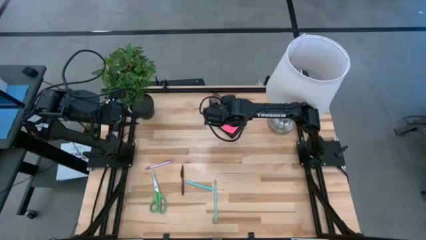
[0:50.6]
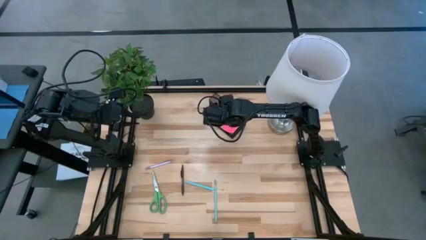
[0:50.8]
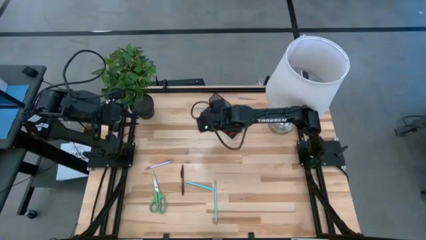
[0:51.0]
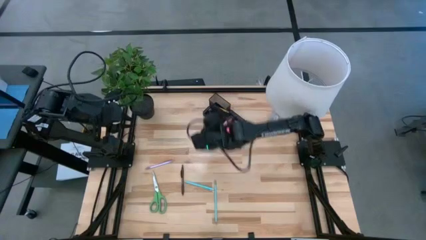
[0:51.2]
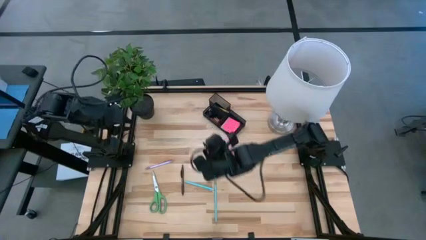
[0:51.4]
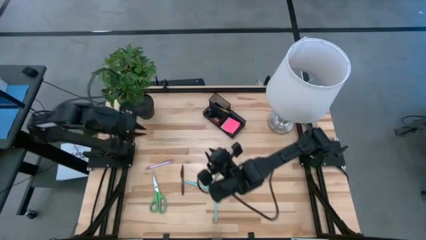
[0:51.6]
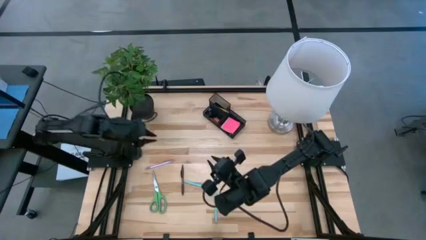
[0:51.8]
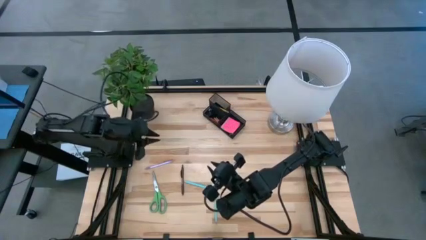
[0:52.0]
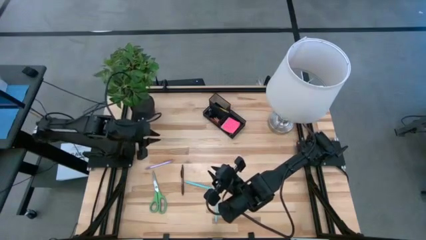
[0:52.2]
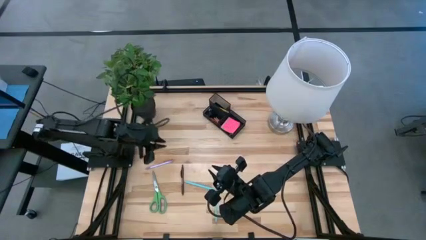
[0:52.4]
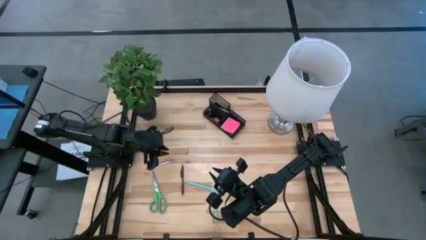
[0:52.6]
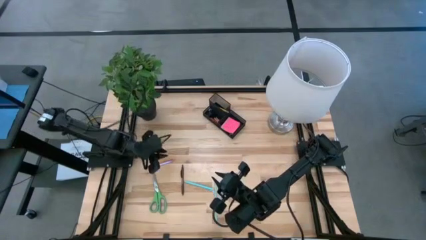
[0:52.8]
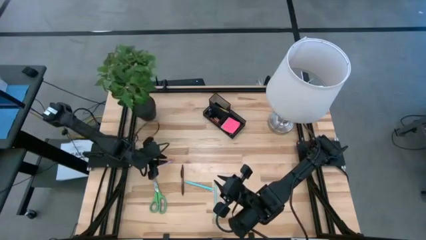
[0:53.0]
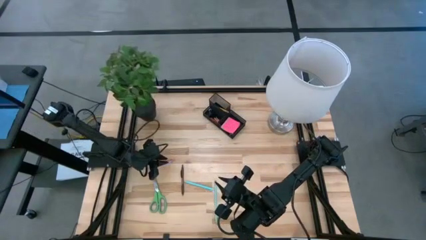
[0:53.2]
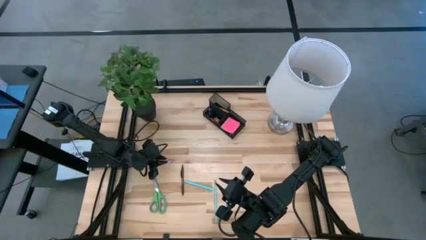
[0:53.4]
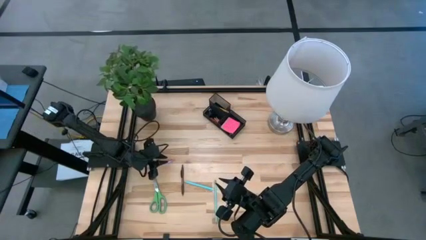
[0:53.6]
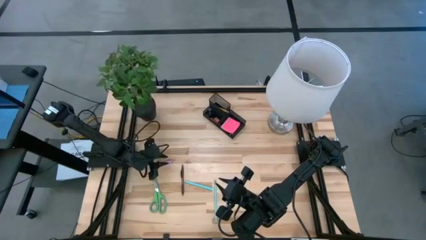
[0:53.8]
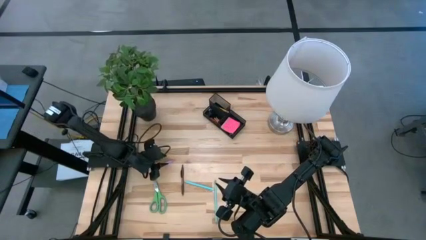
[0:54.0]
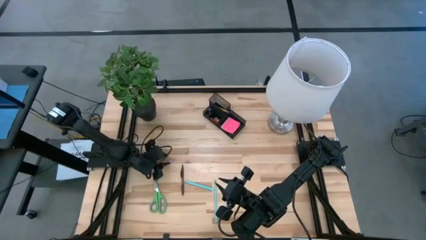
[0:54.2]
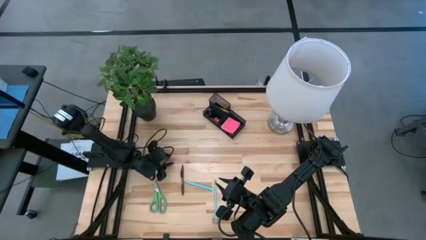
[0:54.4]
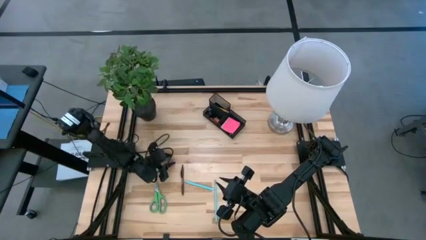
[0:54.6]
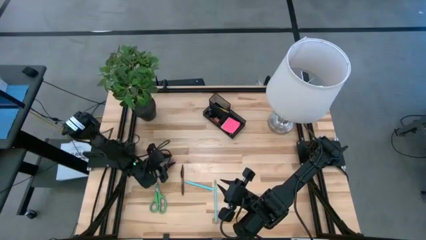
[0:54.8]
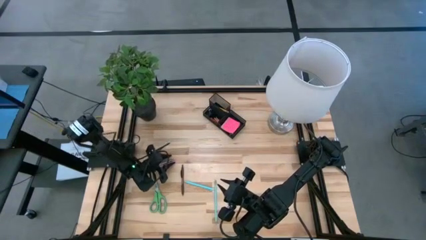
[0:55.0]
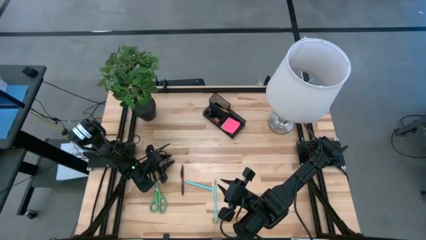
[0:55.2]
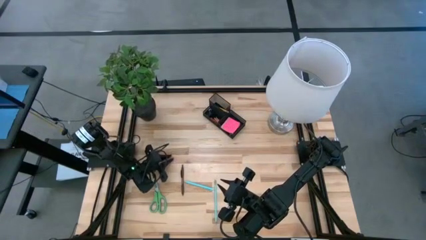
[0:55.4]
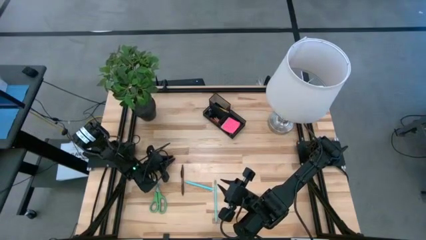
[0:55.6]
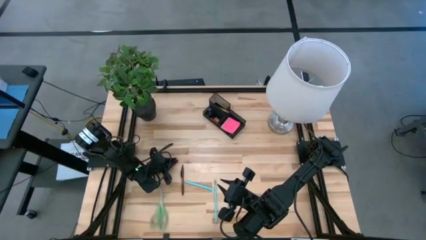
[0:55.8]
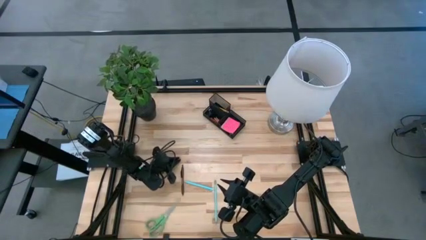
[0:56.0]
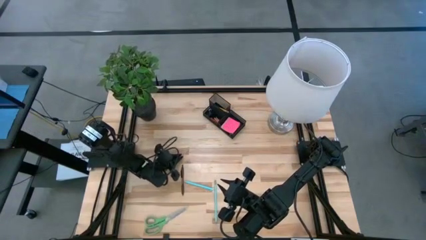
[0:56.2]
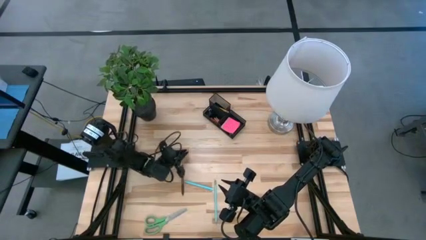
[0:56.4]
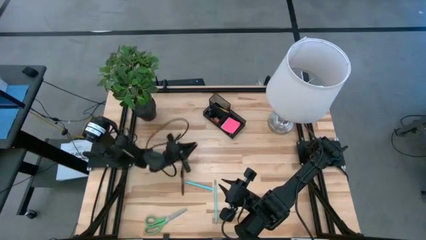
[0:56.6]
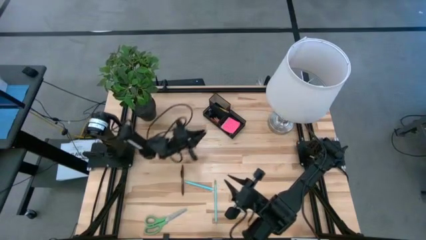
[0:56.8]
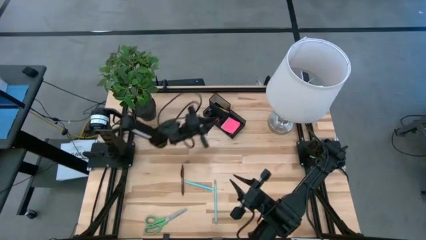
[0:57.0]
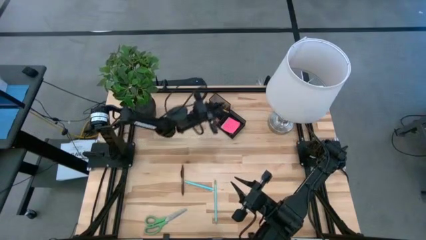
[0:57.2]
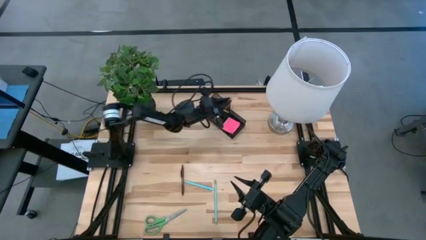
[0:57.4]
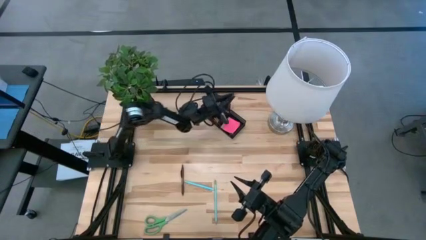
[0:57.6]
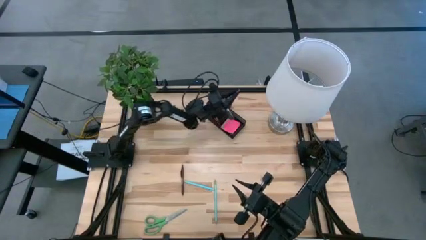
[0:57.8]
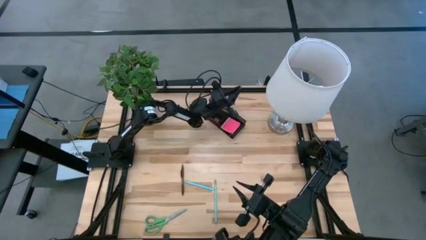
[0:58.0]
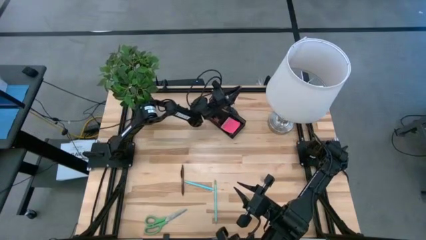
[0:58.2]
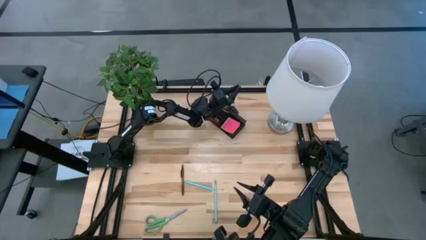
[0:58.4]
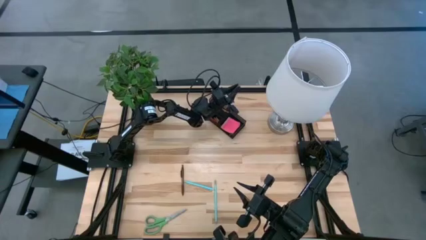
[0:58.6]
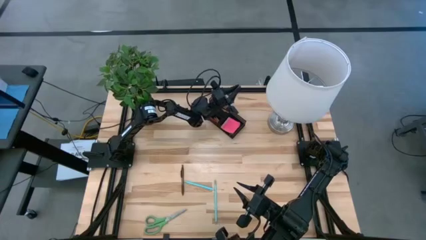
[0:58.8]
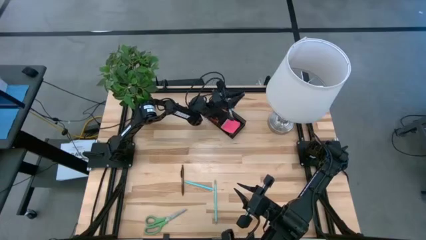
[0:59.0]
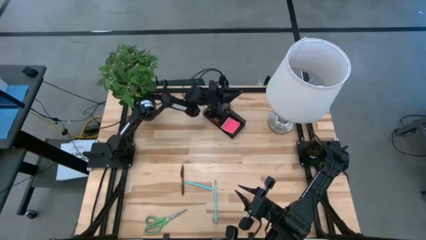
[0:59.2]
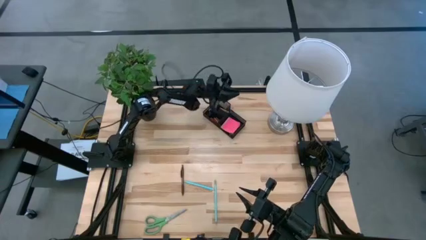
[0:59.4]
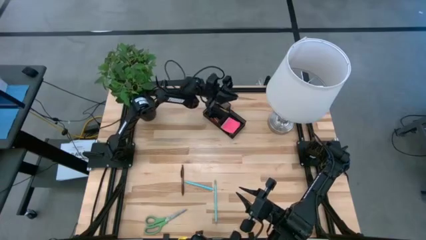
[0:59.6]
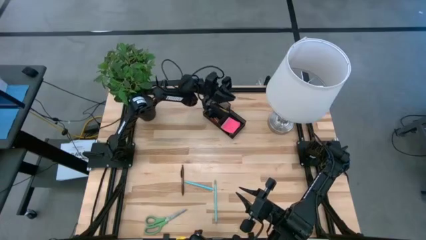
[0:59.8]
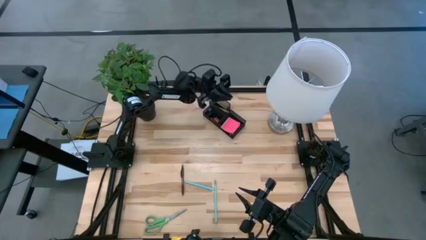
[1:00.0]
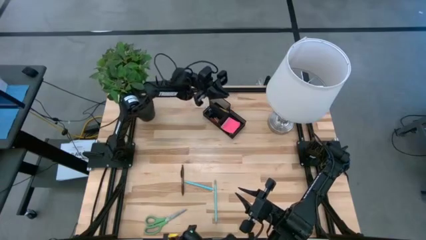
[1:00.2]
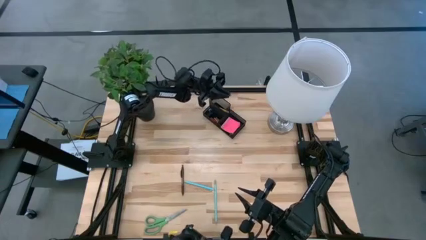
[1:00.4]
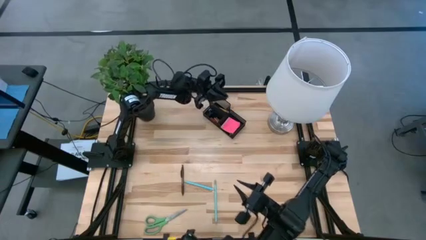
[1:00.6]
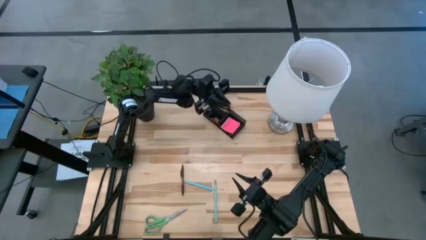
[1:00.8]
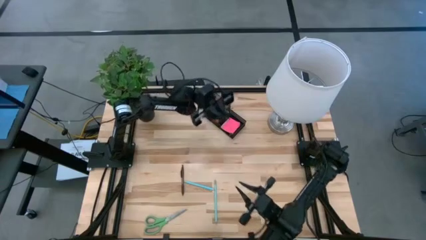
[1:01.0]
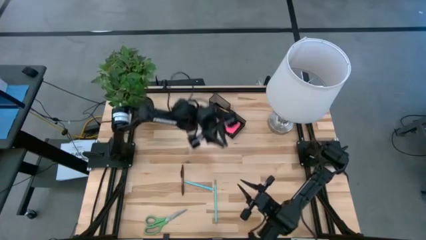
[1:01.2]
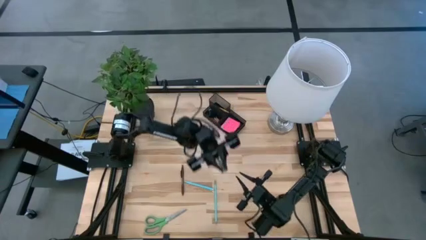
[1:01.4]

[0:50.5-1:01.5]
Task: Pick and place office supplies into organizer
Put the purple pen into the desk organizer

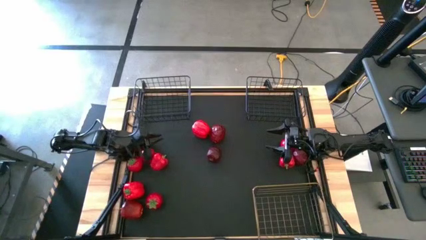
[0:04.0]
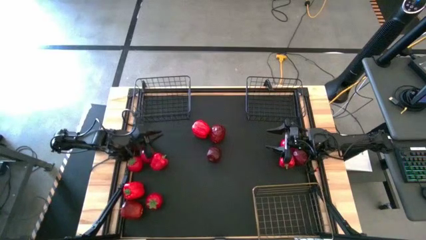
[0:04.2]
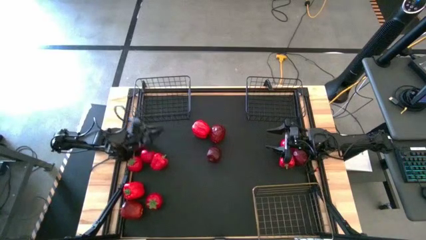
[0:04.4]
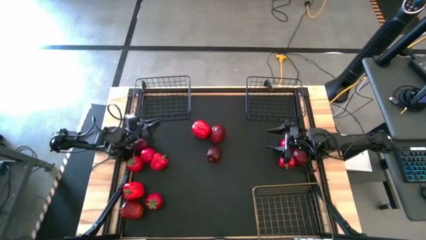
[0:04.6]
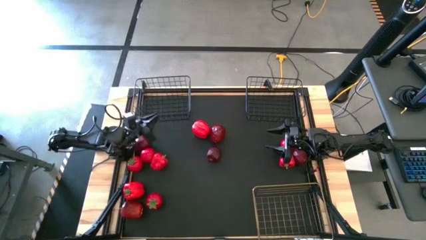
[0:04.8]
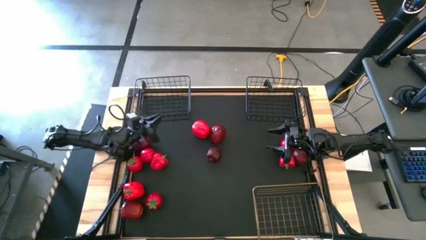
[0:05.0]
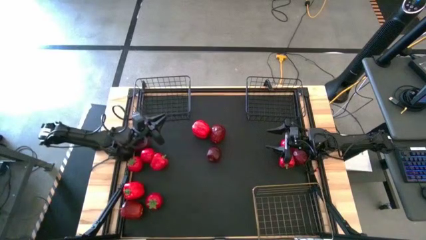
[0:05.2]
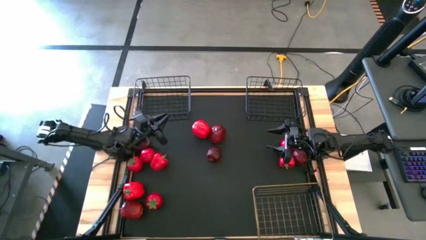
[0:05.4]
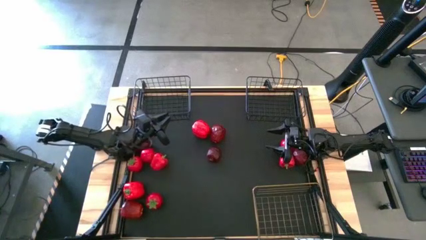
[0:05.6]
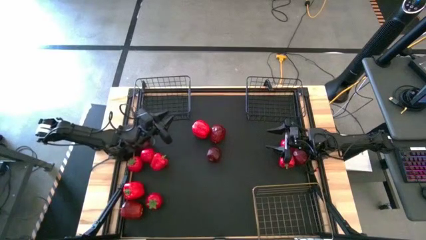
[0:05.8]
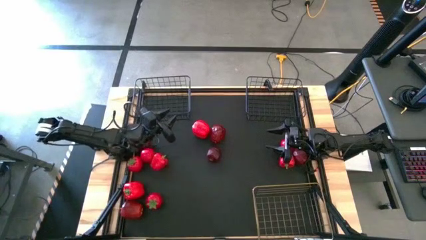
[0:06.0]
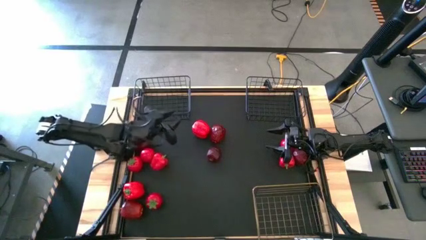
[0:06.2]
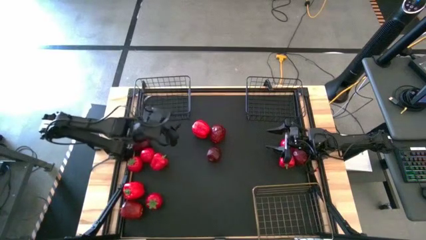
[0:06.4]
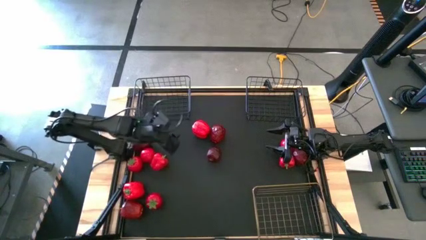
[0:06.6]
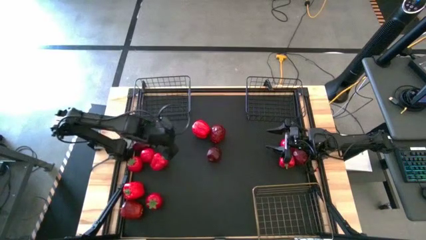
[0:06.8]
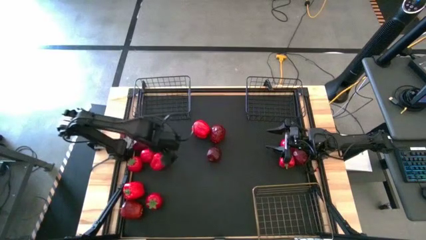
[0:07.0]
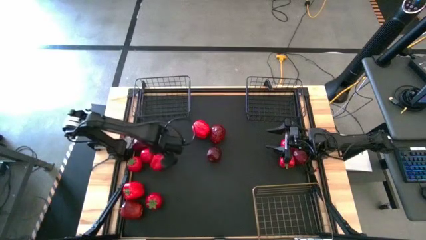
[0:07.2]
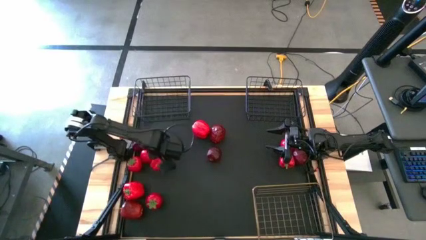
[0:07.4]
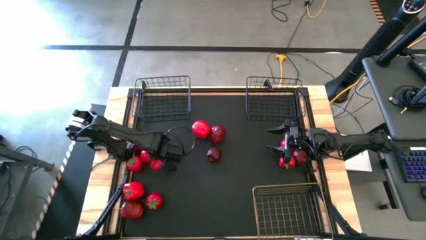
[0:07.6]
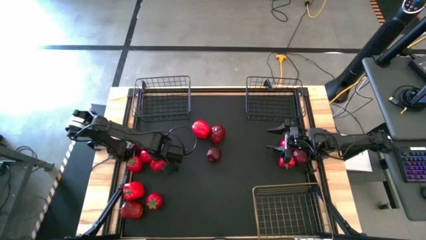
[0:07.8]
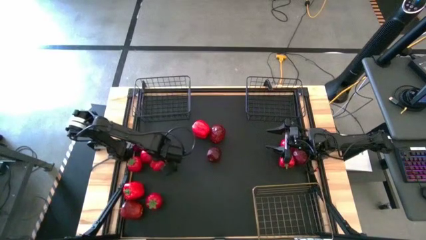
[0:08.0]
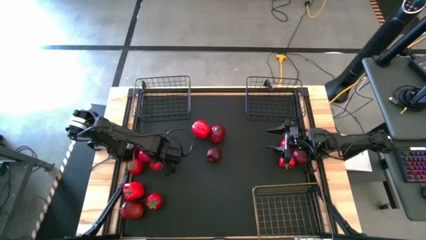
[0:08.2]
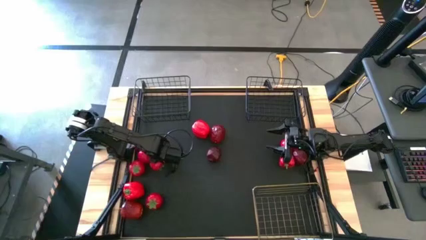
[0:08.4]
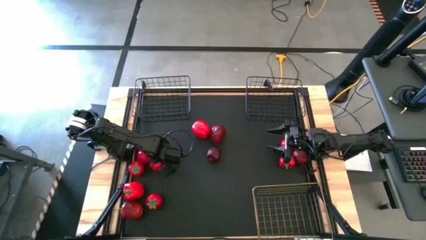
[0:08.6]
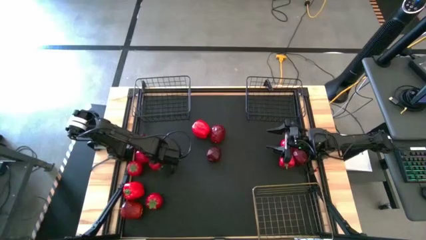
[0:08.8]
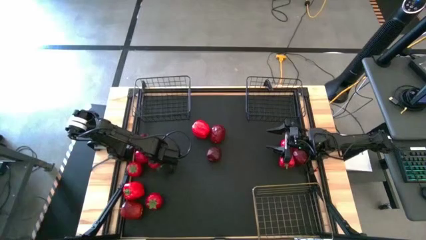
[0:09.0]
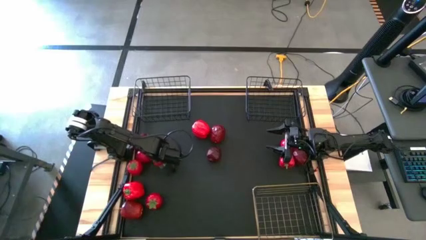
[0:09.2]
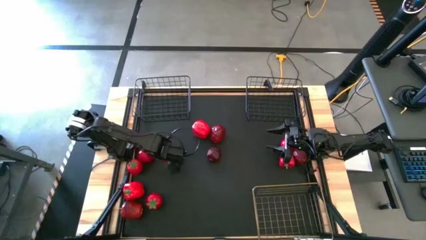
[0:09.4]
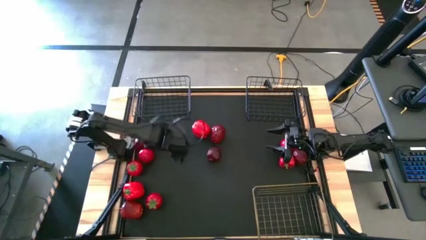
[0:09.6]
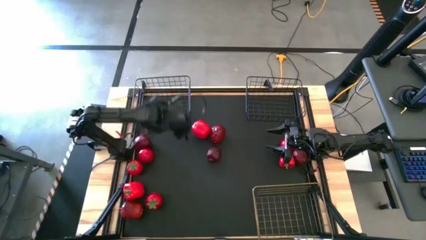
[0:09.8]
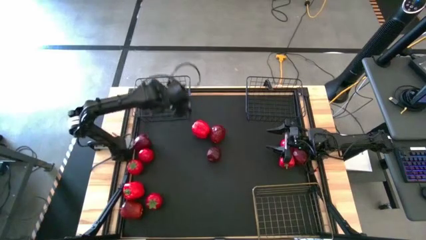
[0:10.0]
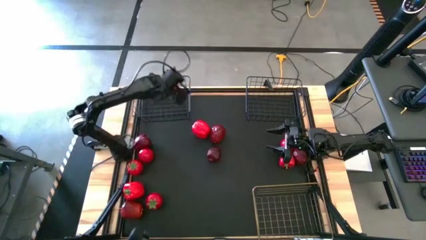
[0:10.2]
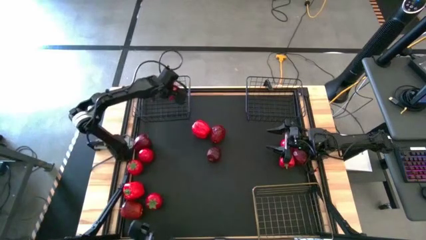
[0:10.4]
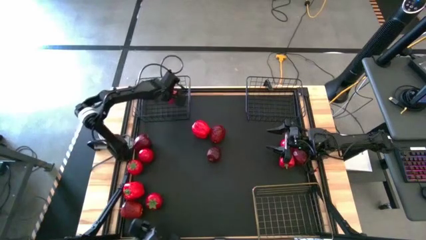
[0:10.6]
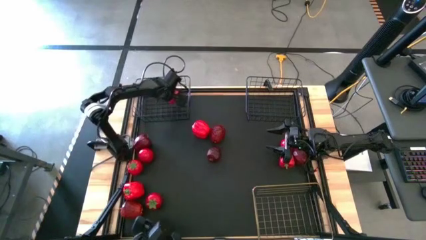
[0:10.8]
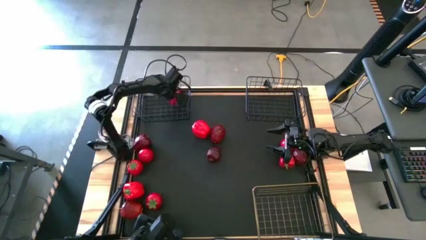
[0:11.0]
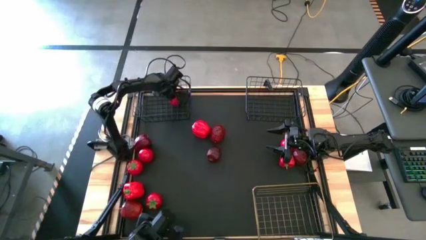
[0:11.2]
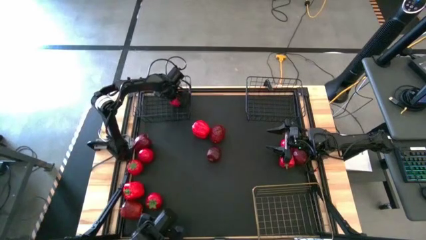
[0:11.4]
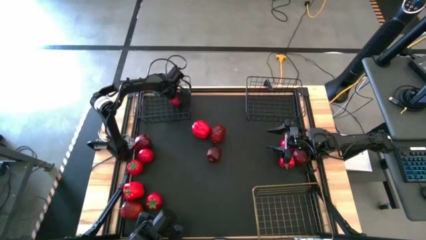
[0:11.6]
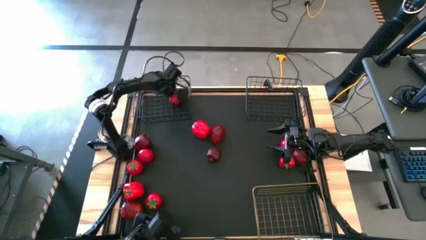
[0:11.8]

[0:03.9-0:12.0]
Task: Sort produce into baskets
Put the bell pepper into the left black wire basket
